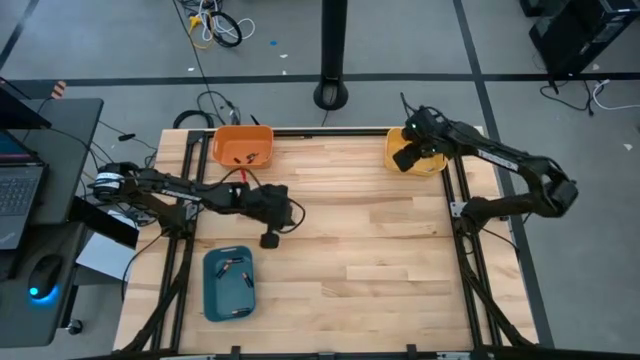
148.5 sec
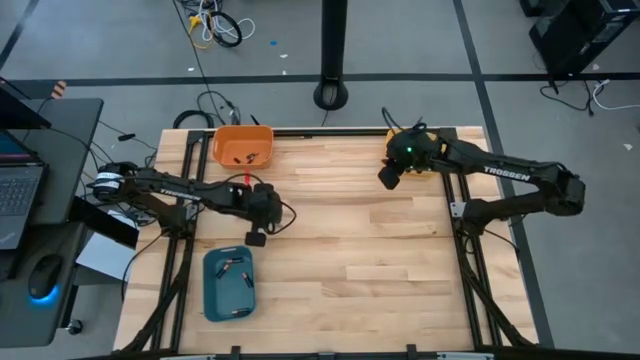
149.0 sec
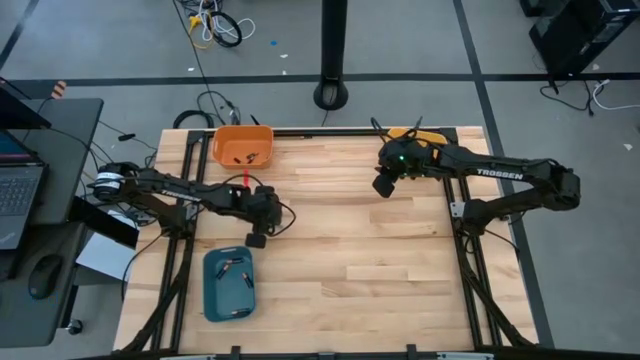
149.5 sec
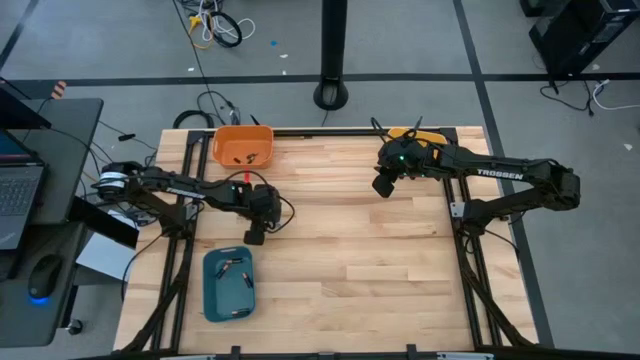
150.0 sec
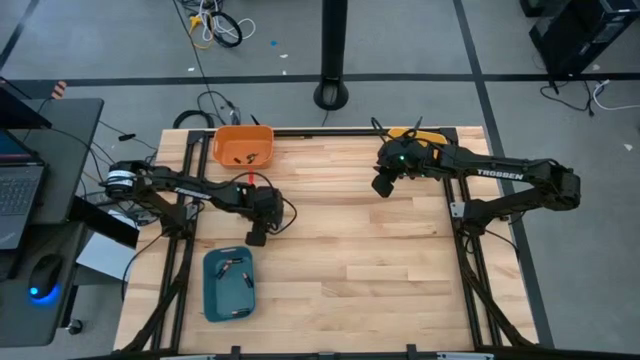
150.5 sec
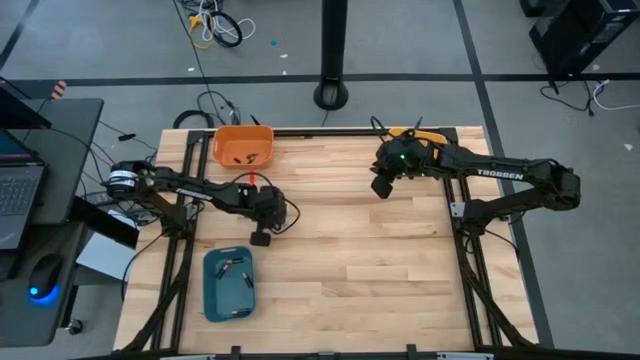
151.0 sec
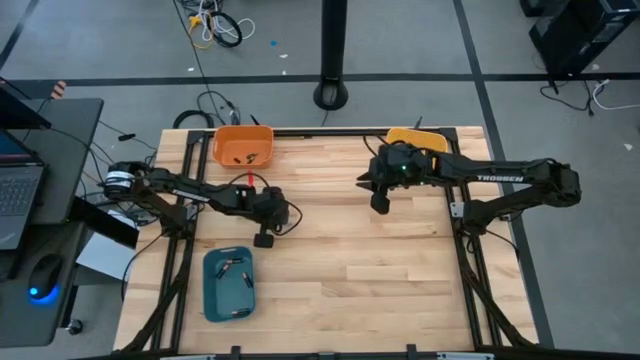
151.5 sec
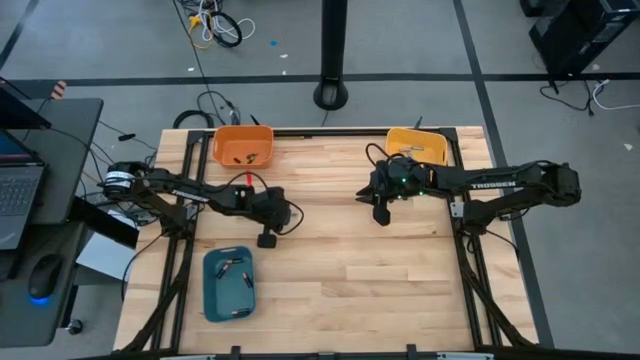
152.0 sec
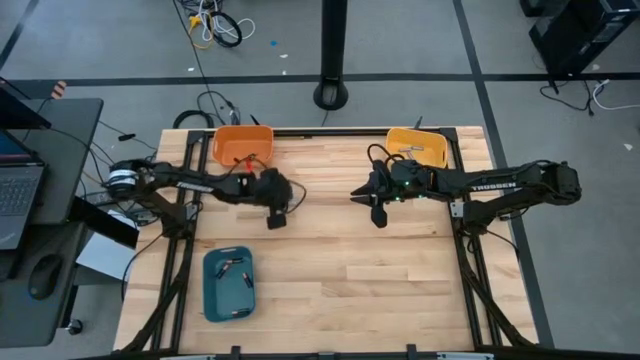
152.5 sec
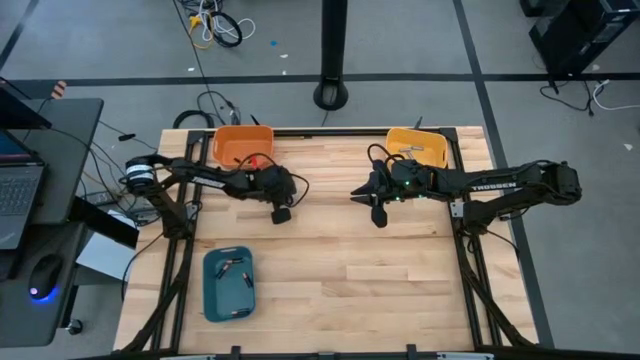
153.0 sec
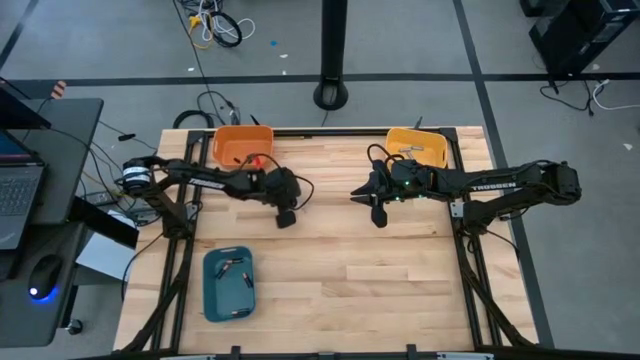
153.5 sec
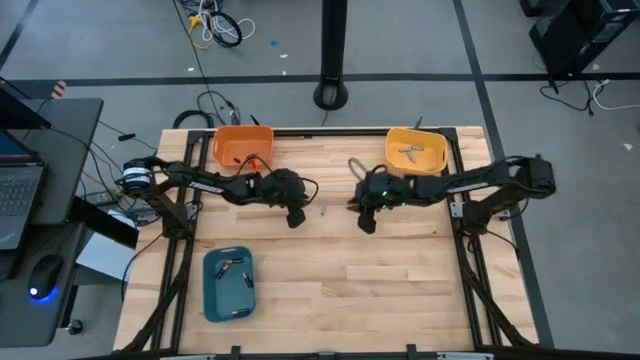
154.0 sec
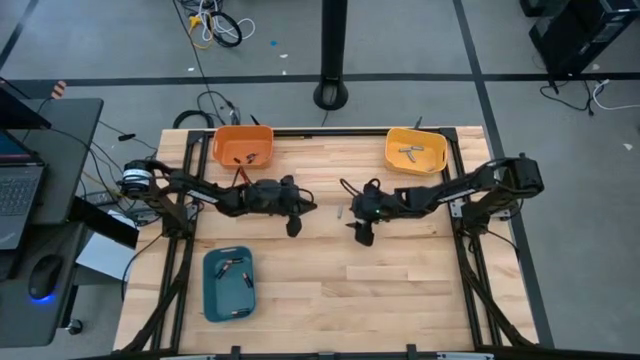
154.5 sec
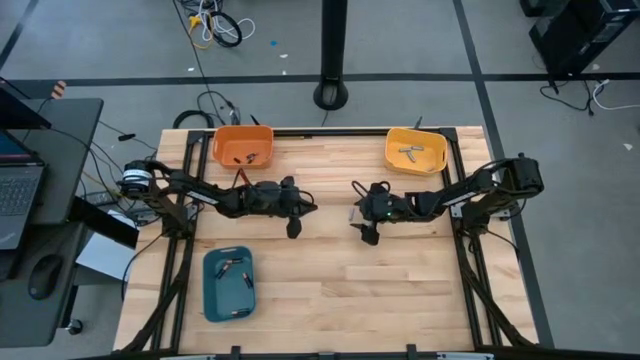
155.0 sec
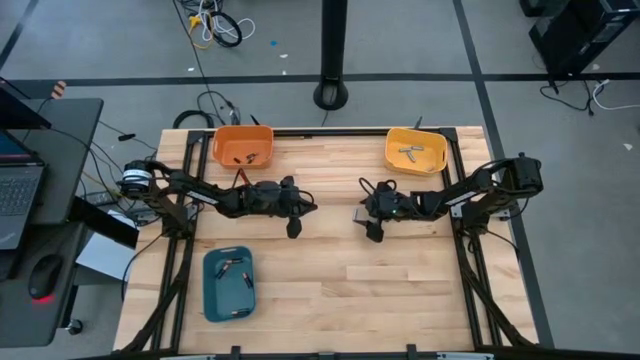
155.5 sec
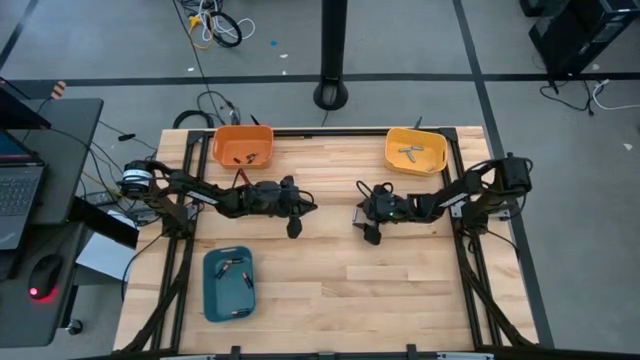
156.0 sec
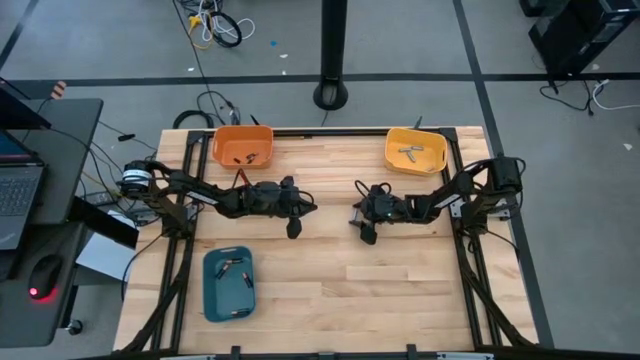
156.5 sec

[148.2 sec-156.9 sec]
Task: Sort batteries
Put the small gray battery into the yellow bin

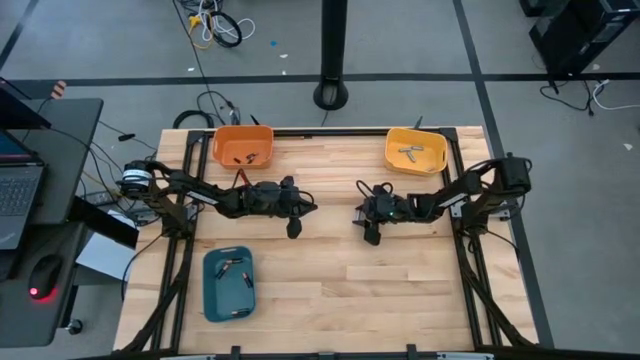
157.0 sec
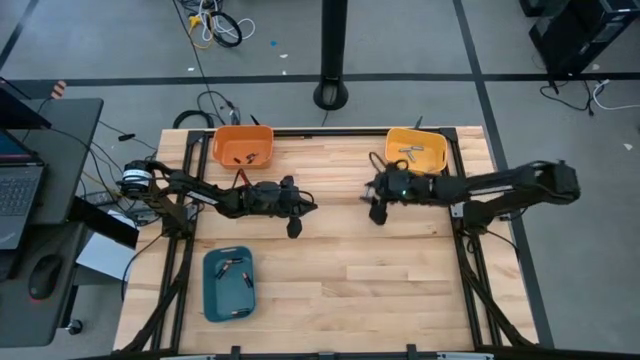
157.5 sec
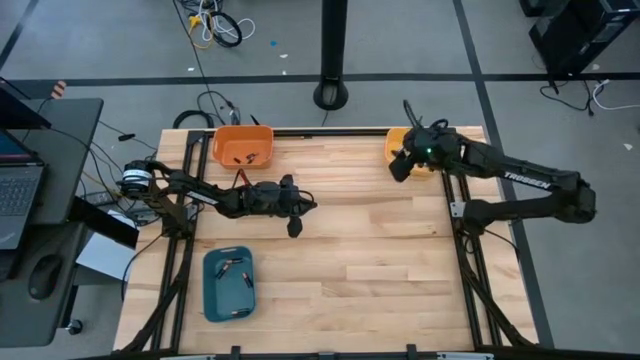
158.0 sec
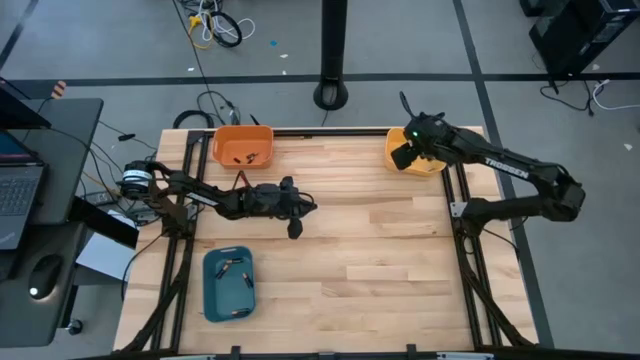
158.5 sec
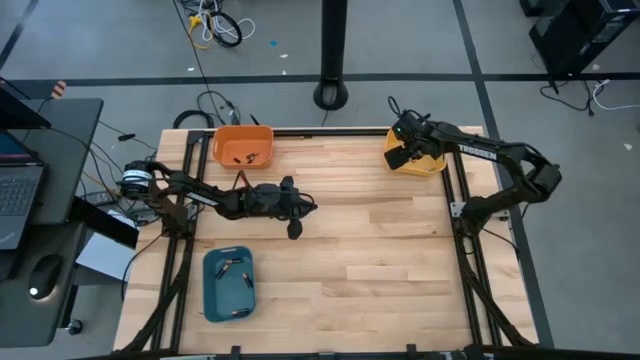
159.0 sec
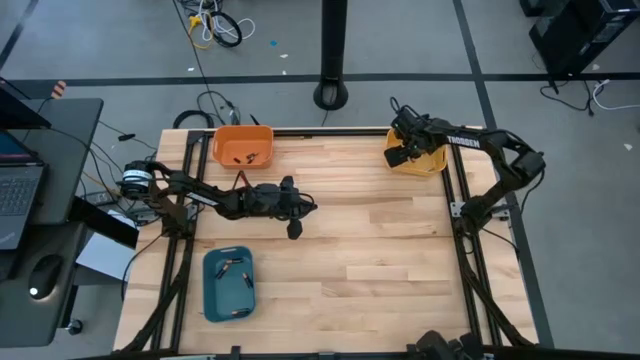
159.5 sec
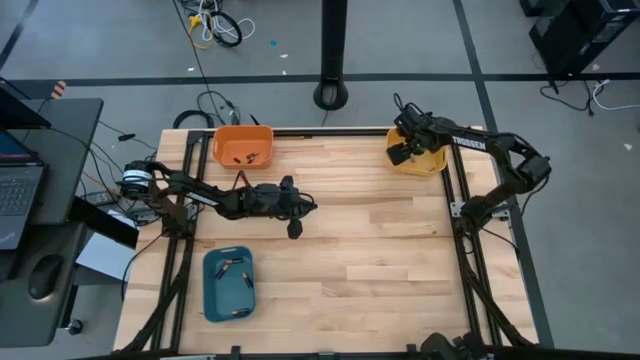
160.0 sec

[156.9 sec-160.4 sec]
Put the small gray battery into the yellow bin

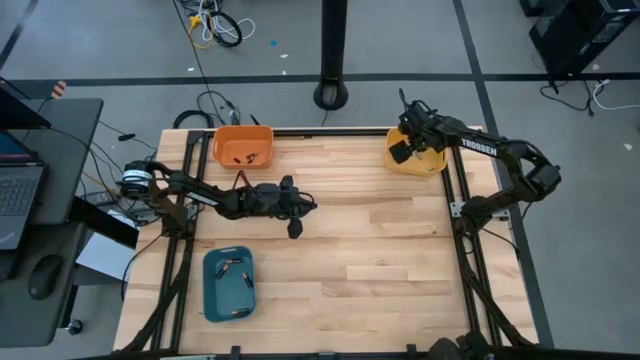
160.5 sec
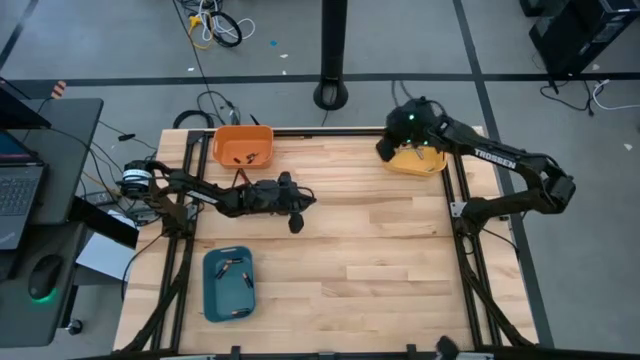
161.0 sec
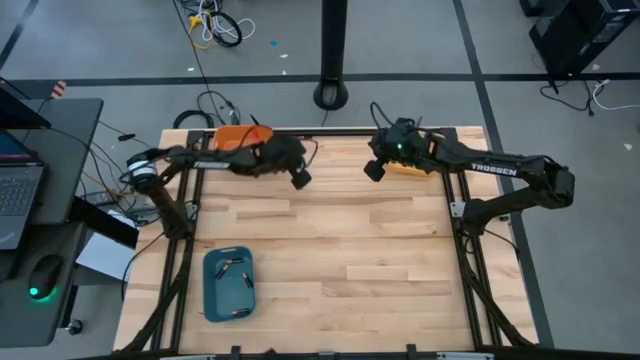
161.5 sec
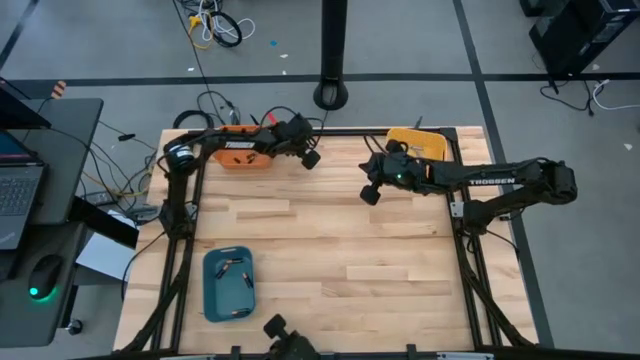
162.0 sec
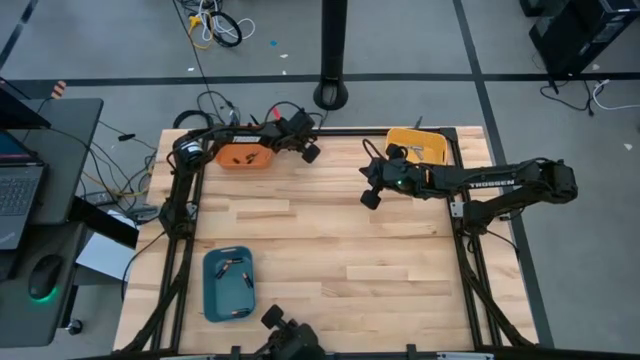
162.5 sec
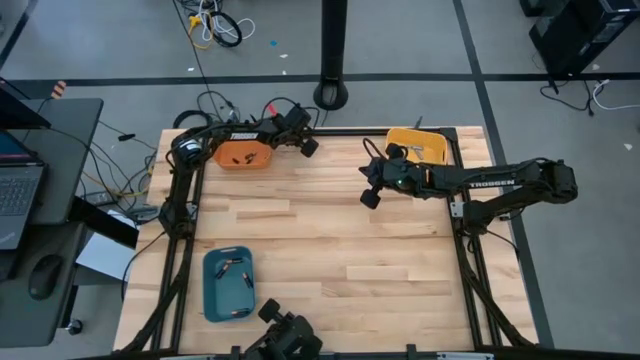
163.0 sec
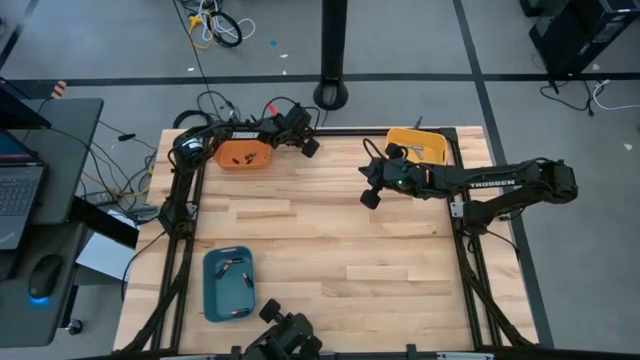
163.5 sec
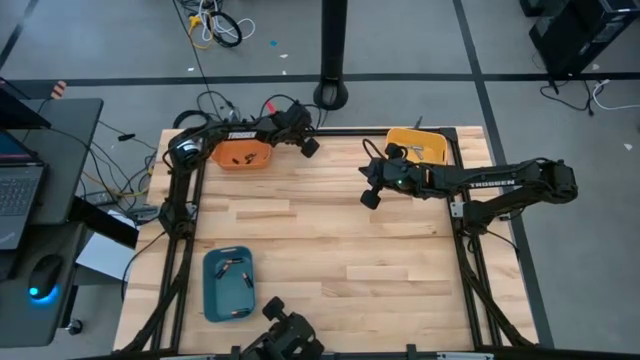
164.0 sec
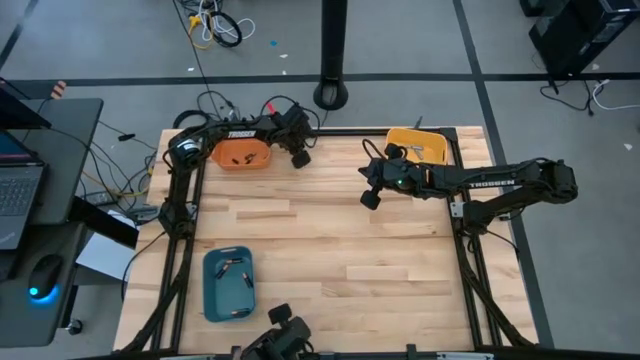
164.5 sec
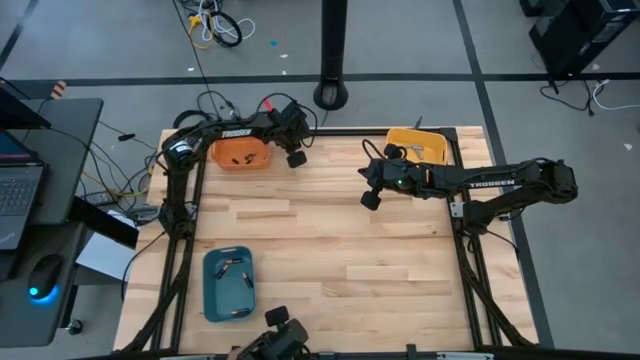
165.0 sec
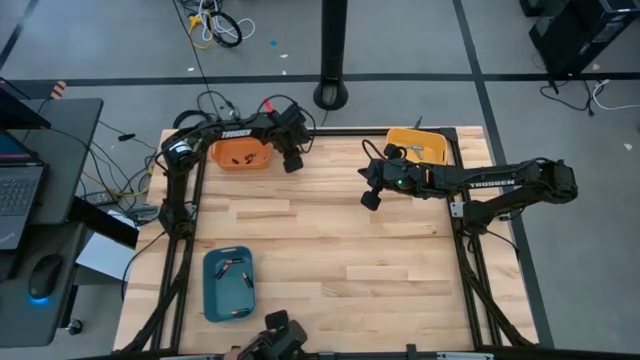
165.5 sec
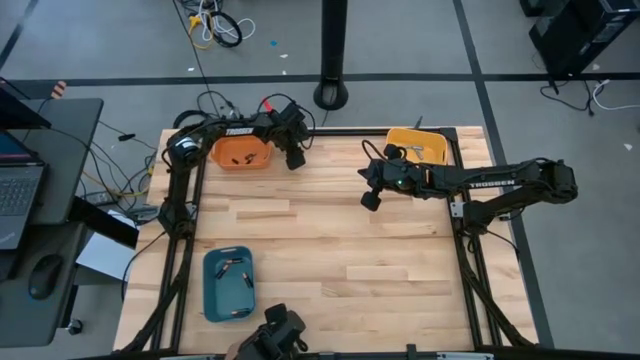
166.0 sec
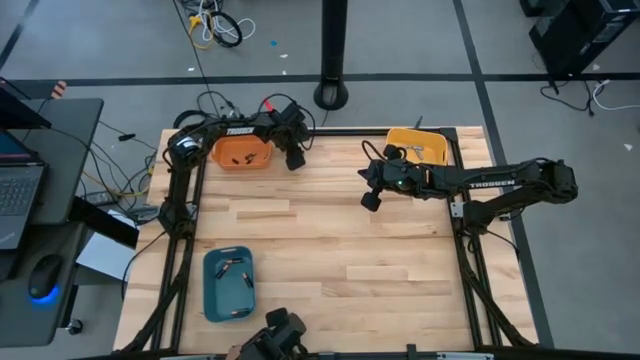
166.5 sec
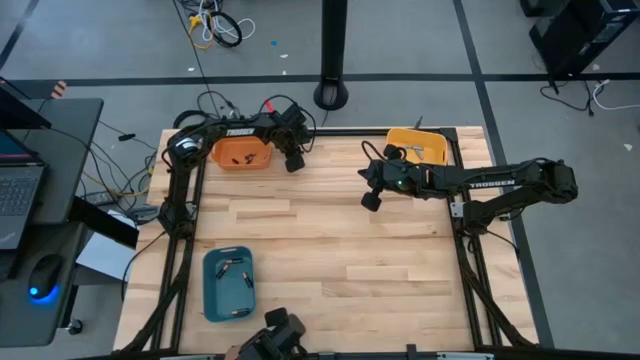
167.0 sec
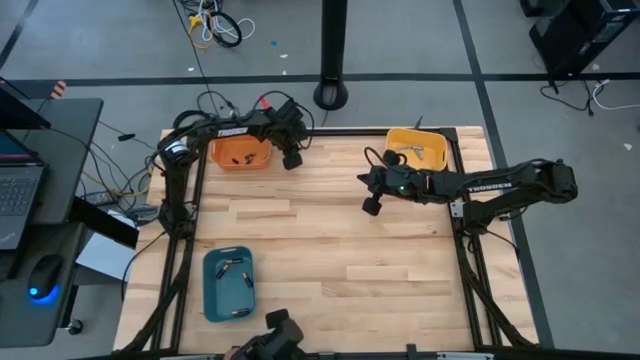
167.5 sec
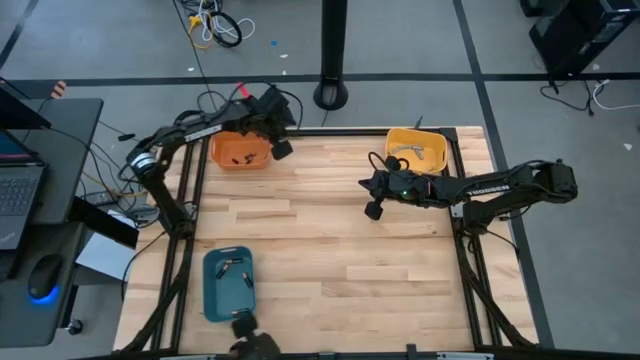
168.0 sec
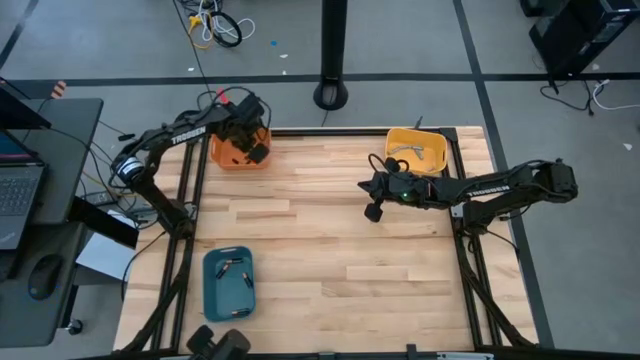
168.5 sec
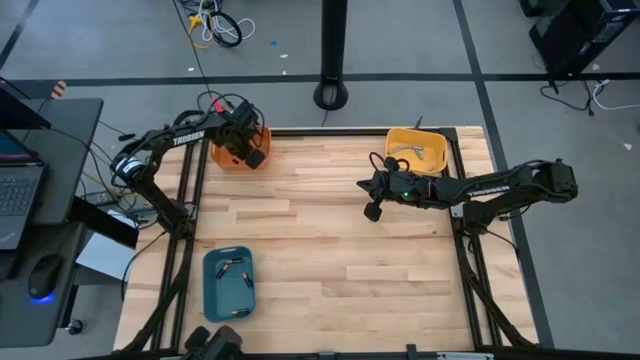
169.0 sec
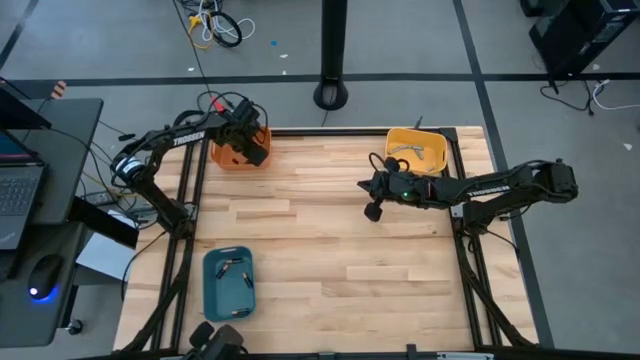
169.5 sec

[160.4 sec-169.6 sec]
Put the small copper and black battery into the orange bin

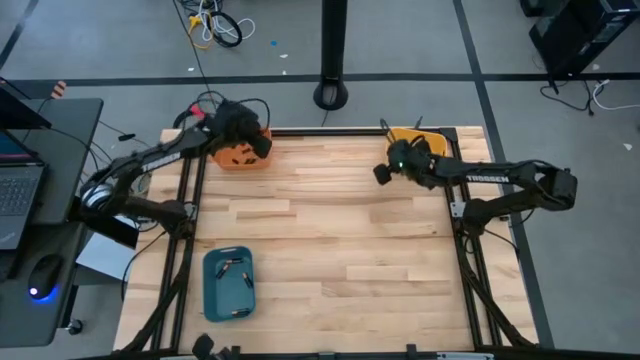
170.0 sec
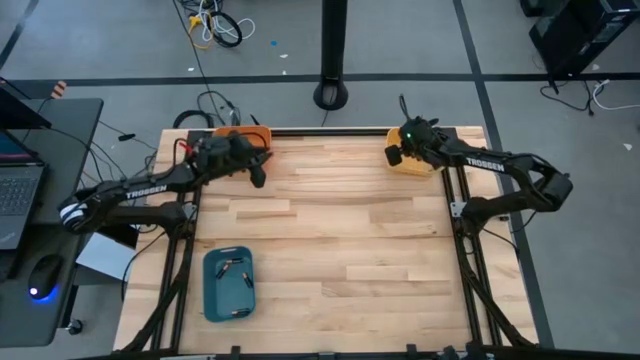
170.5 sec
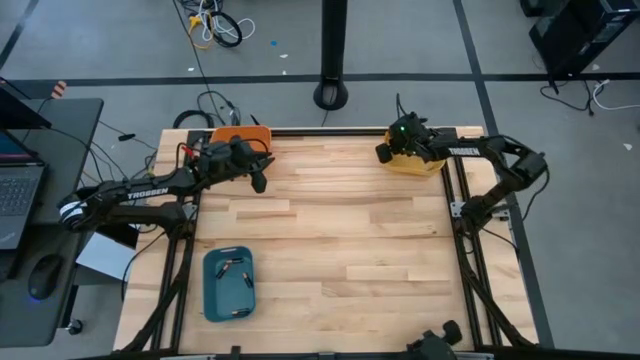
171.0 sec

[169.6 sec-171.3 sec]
Adjust the yellow bin on the table
